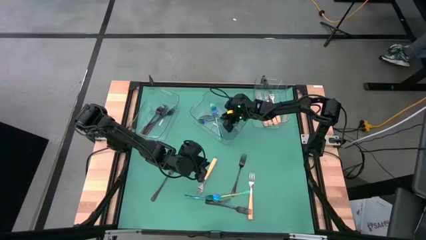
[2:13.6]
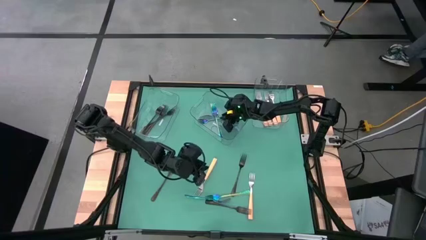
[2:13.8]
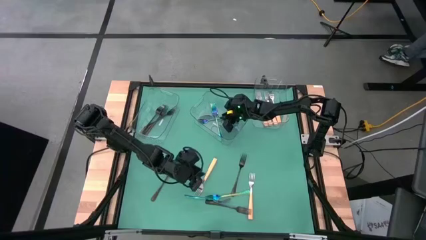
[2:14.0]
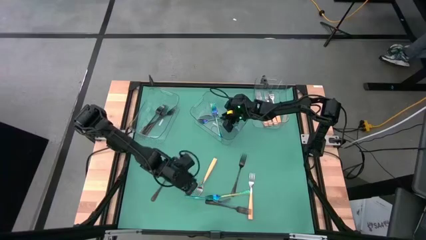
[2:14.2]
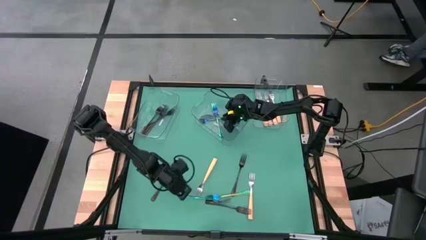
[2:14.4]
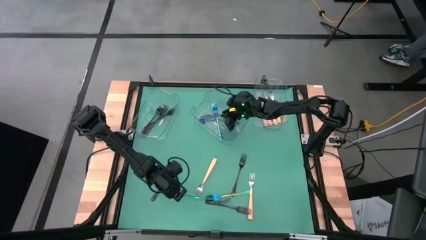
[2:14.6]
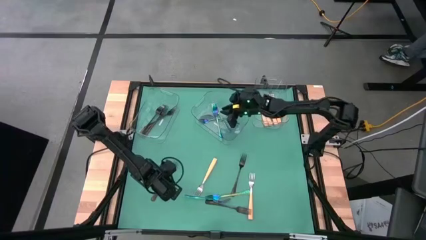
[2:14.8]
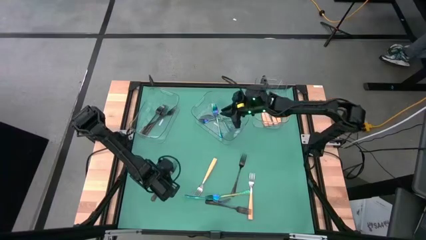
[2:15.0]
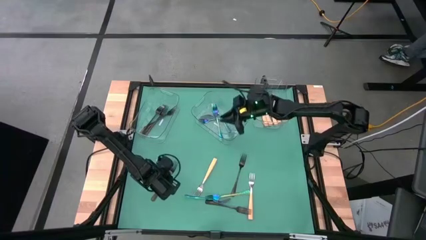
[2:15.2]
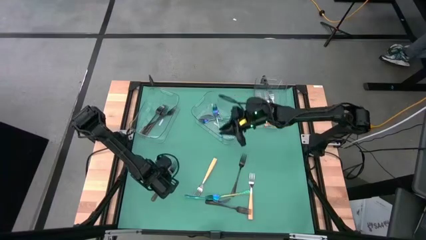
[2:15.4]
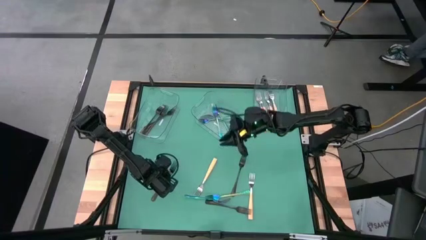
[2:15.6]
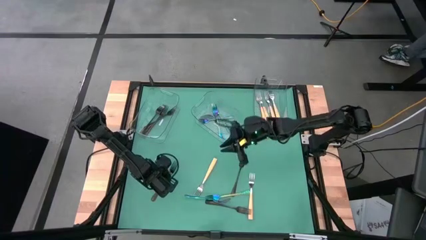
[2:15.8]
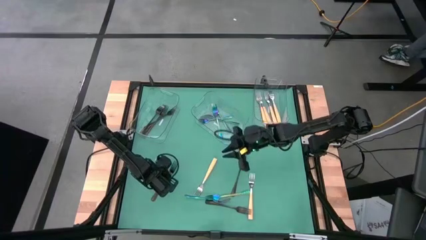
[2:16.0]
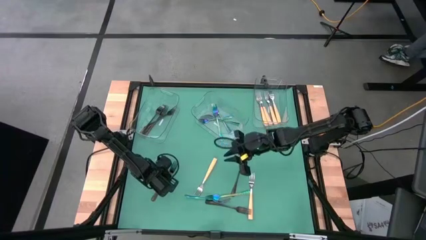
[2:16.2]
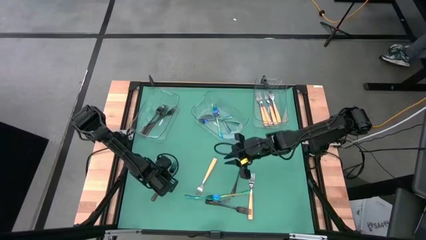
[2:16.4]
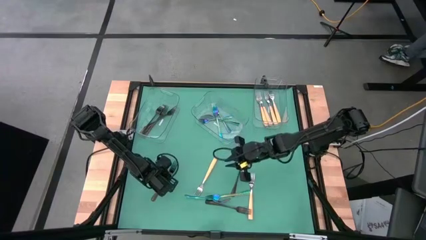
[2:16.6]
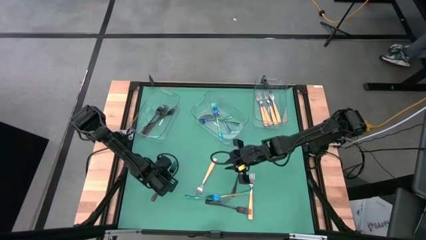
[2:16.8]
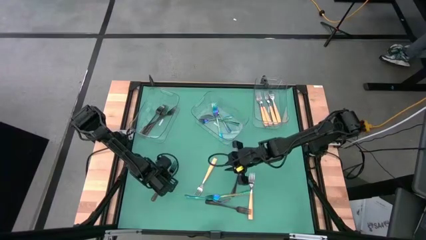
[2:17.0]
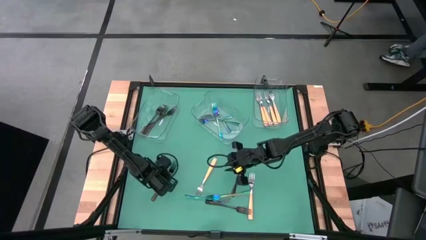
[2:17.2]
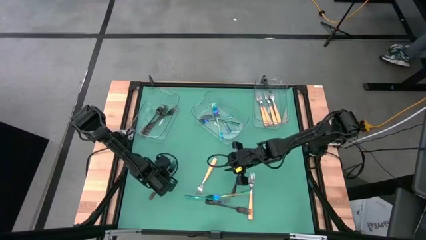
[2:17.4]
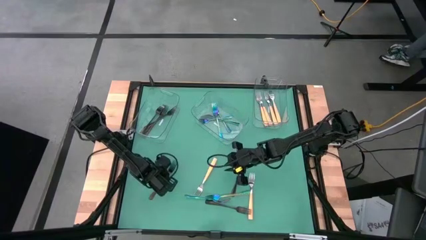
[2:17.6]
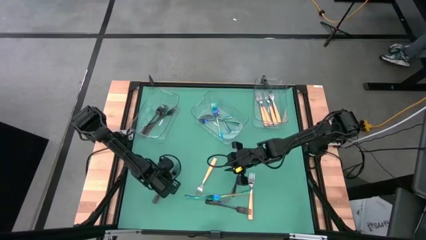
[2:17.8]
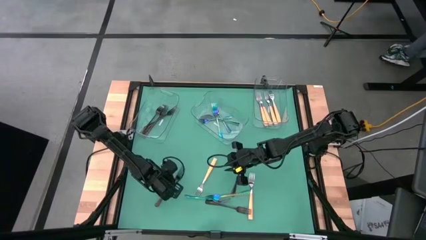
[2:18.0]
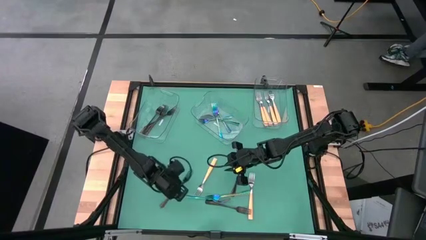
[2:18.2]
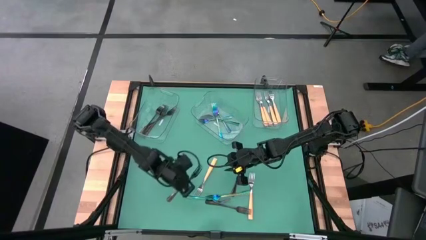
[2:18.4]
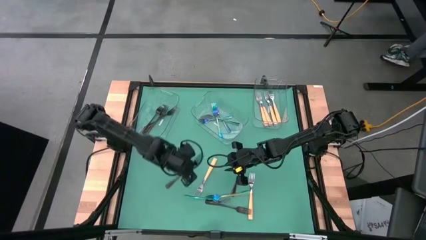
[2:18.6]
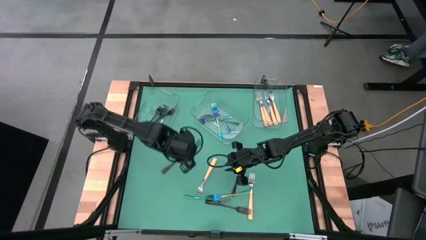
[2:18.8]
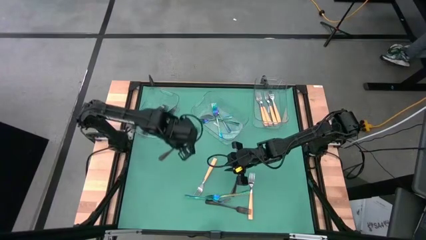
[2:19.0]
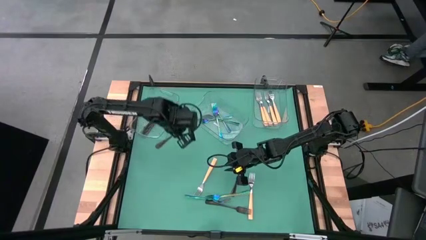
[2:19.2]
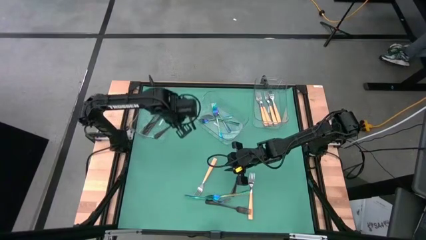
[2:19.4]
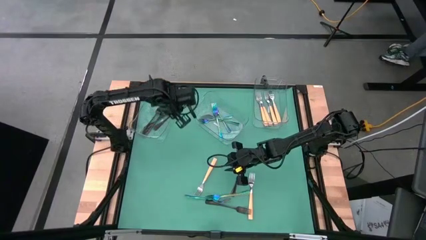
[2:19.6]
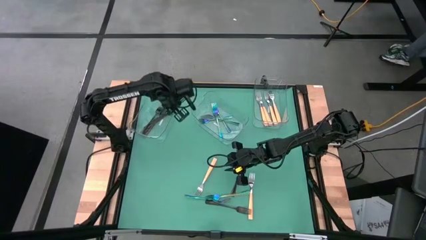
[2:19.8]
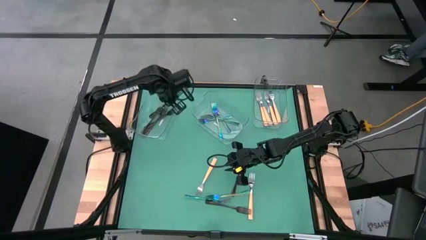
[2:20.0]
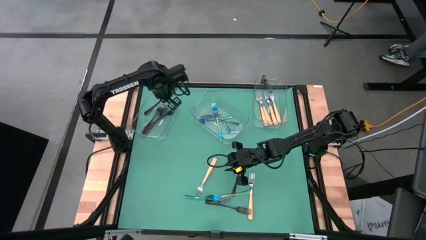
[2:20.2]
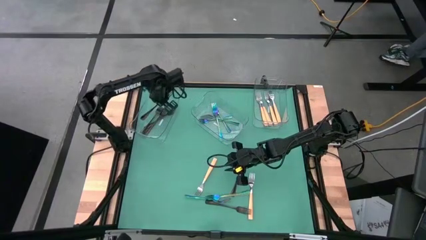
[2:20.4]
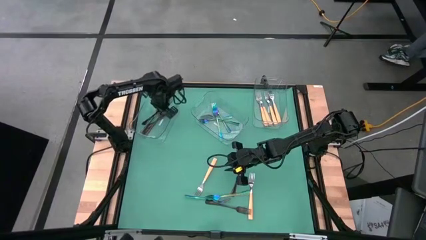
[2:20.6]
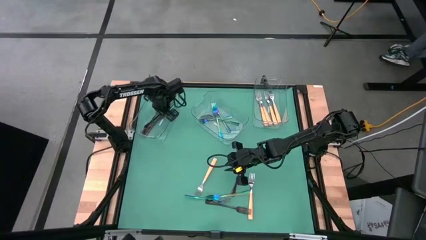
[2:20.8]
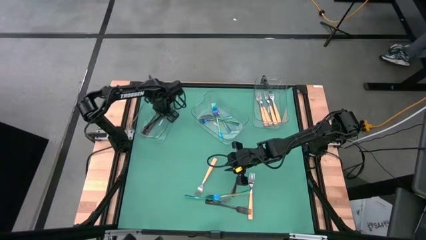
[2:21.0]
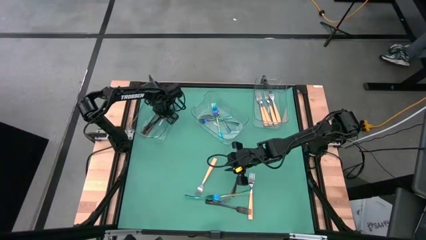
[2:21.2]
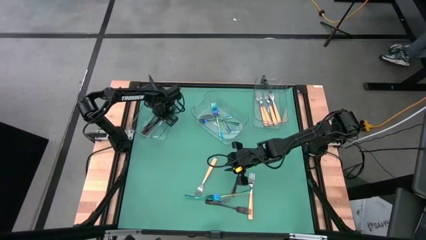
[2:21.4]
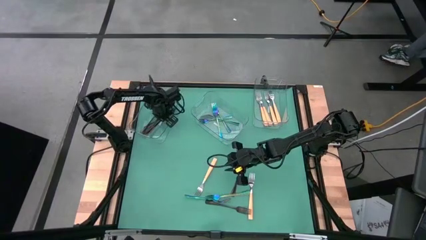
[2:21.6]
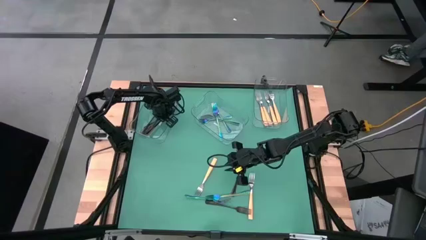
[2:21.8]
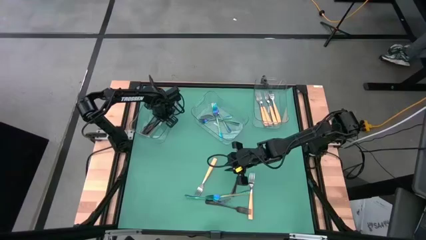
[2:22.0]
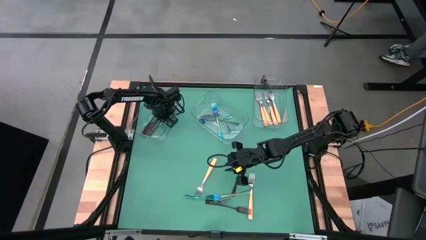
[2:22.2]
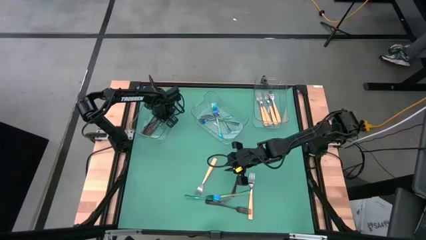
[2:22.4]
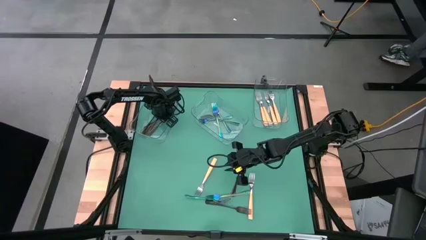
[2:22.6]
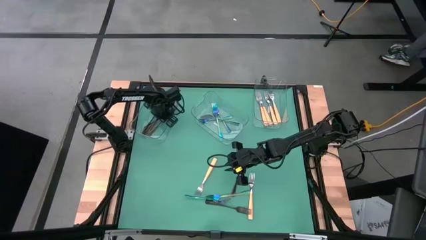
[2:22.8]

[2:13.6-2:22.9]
Task: Sort silverware by color (type)
Put the black fork into the left transparent bin

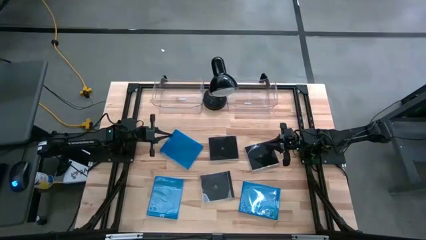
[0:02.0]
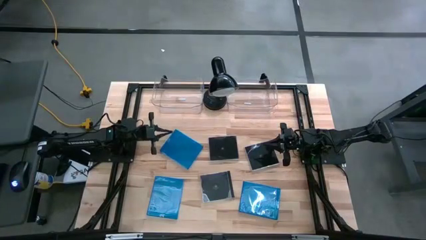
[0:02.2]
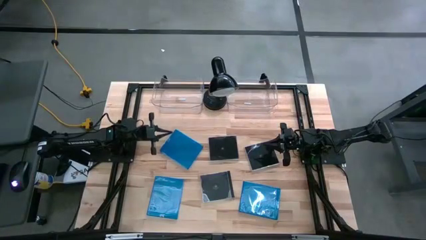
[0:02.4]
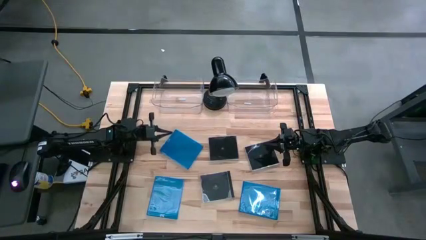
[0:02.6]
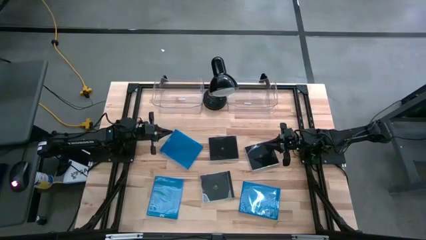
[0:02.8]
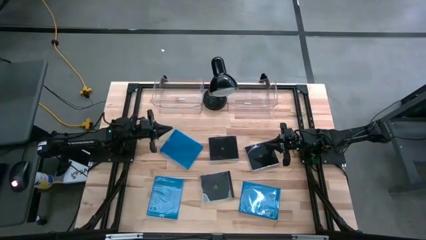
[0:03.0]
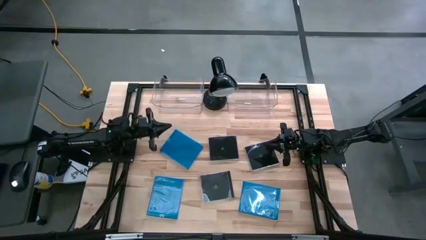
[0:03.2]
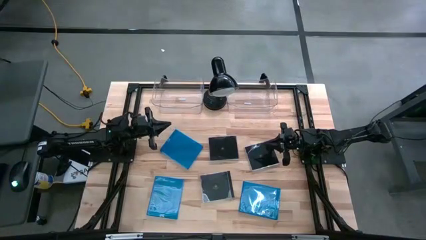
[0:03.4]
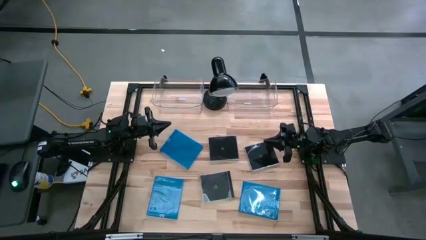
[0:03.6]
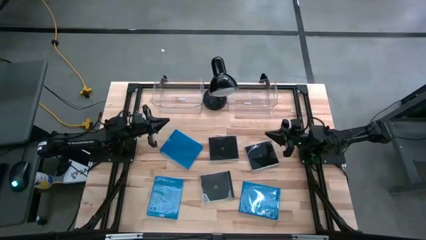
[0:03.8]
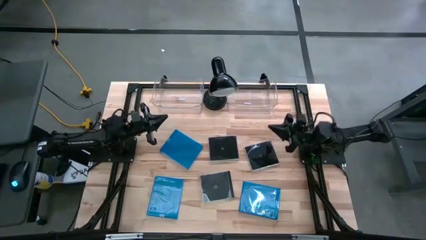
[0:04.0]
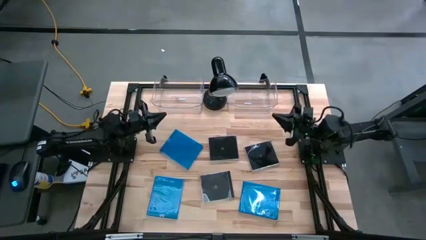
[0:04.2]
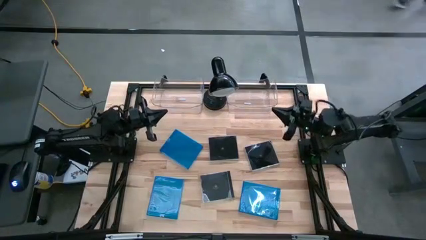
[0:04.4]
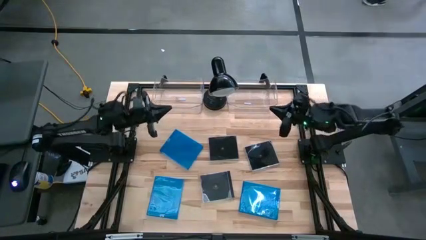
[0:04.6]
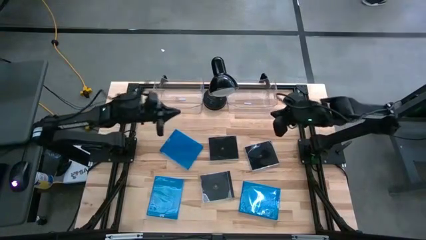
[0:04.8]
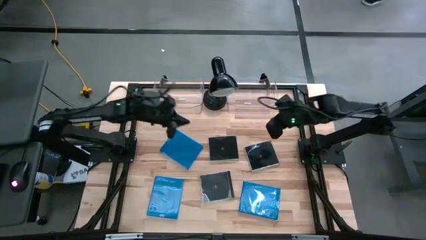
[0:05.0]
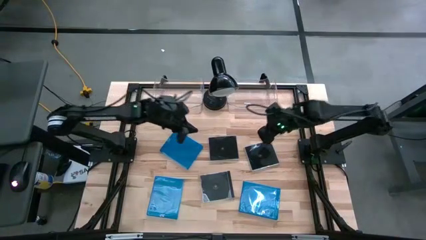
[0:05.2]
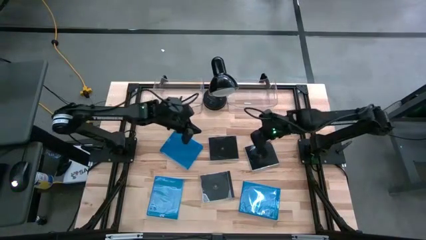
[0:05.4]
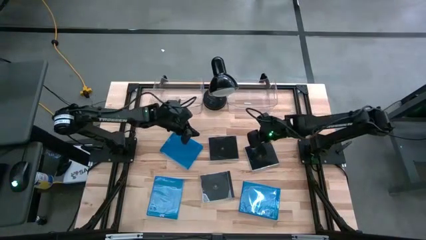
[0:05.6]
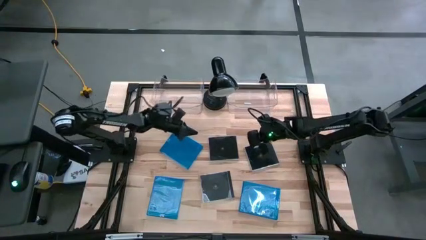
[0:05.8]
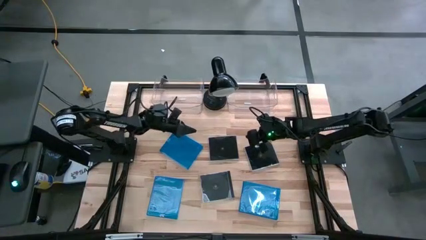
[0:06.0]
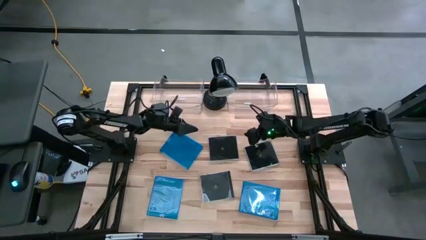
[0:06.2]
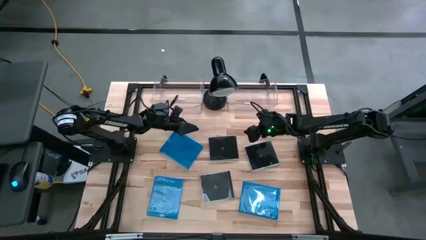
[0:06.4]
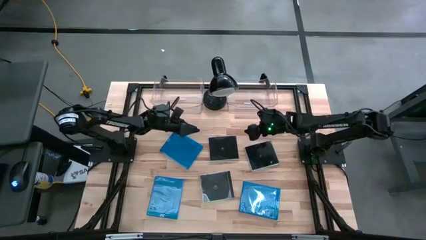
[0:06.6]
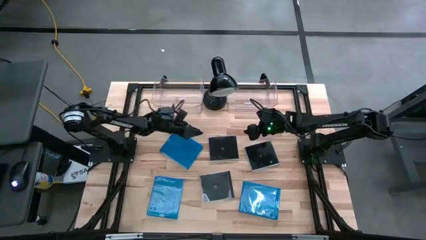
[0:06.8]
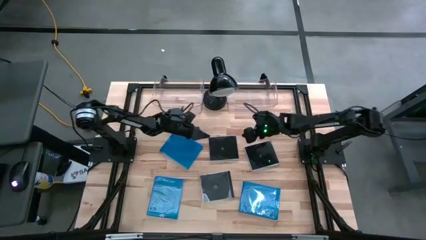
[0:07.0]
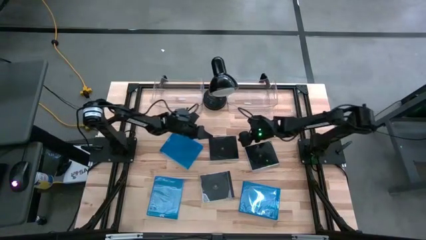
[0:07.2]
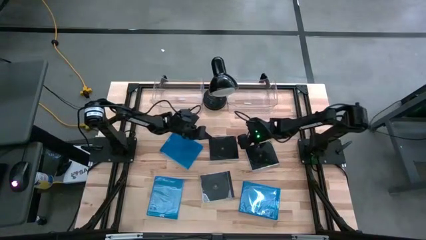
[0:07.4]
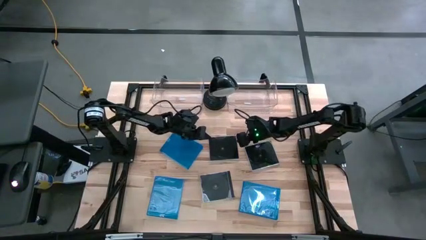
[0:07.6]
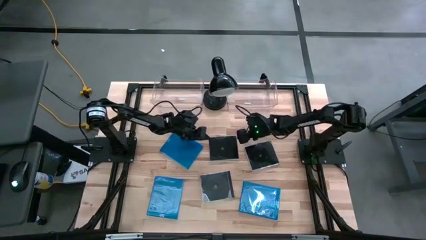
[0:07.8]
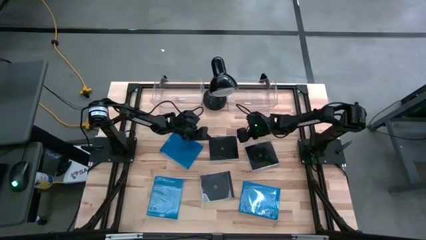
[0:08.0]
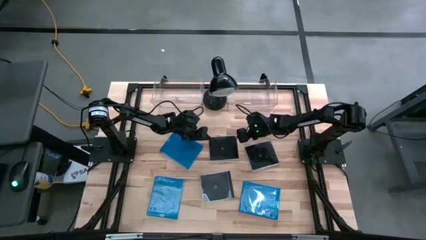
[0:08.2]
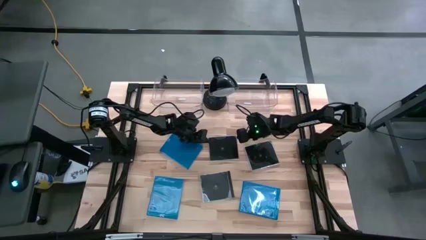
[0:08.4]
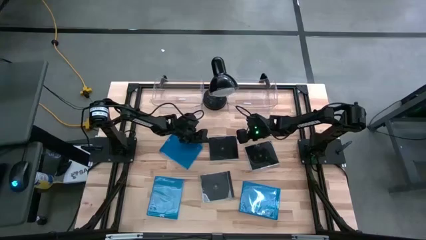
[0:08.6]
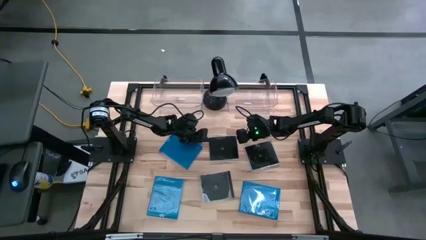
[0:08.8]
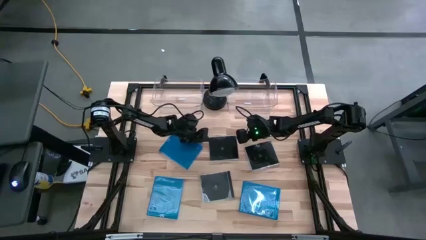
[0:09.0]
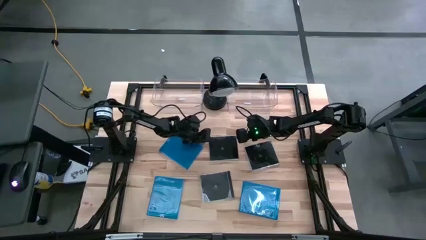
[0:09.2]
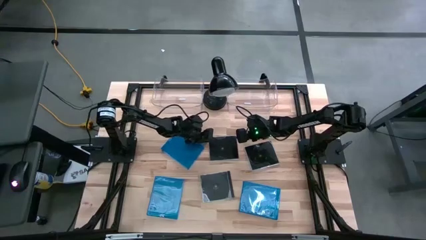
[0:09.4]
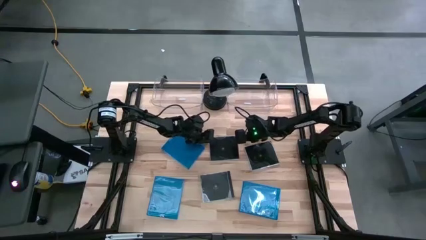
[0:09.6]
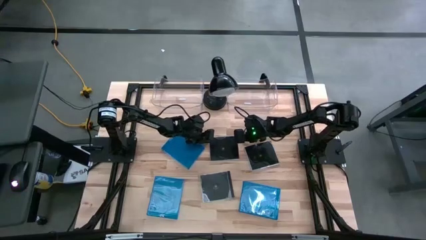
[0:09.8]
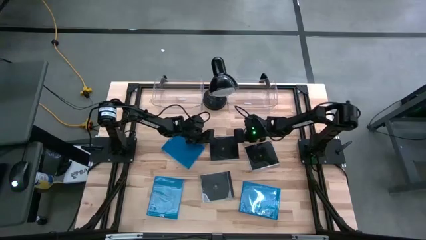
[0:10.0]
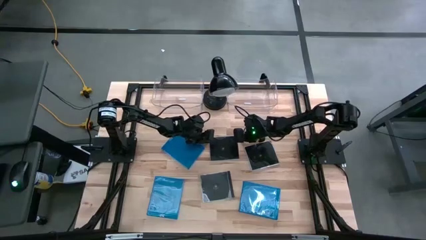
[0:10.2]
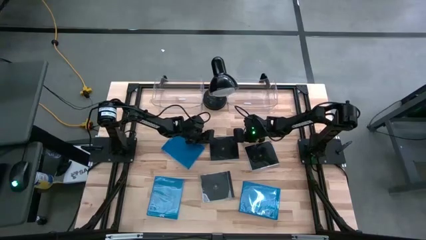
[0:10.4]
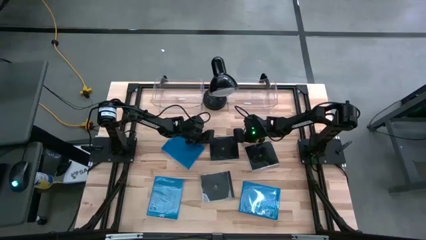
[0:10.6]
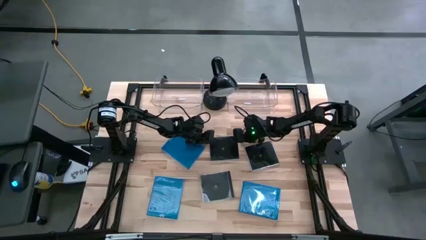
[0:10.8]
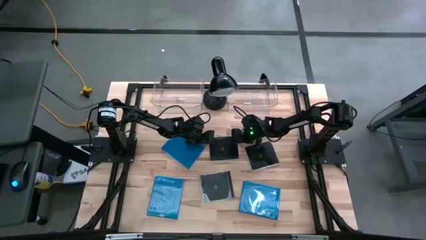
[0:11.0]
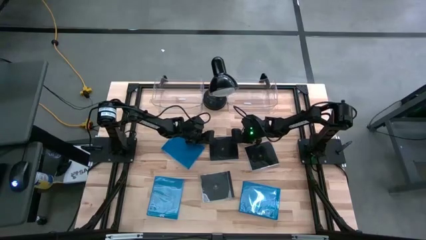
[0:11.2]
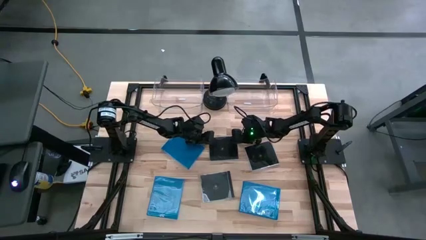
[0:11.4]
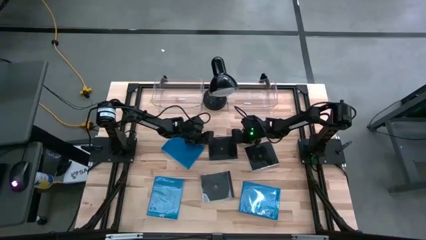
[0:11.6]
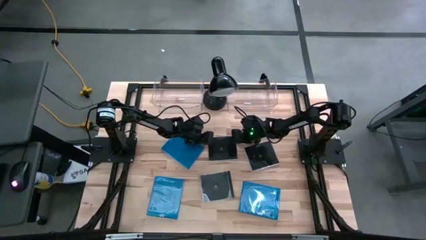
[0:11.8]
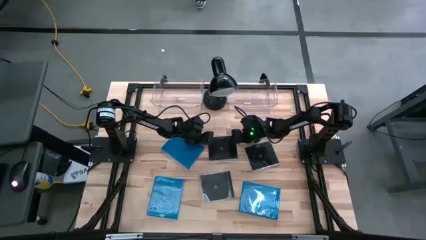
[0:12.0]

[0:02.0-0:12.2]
Task: Pick & place jewel cases by type
Put the top left black CD case into the right transparent bin
